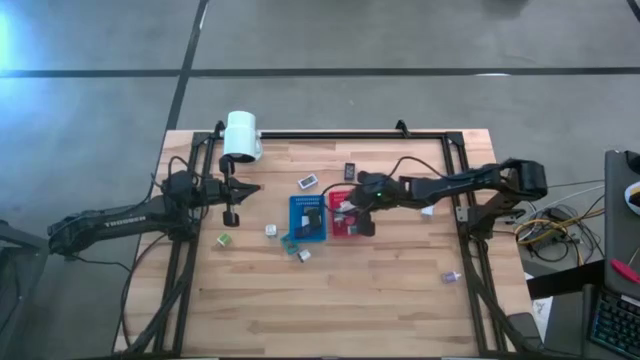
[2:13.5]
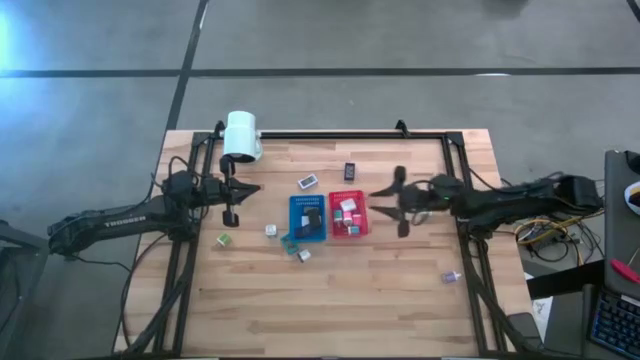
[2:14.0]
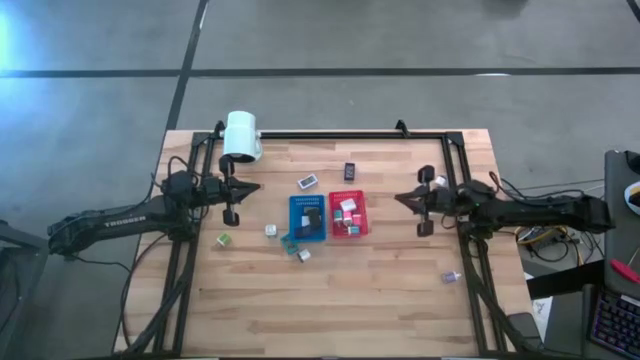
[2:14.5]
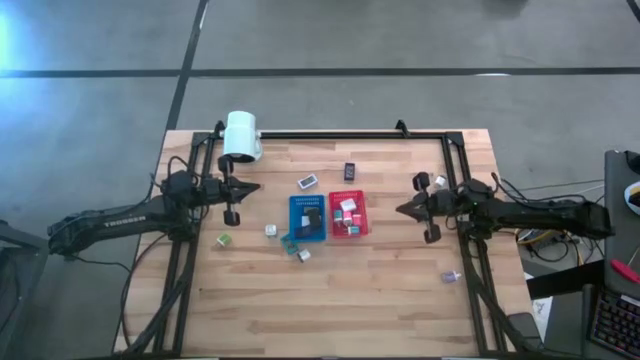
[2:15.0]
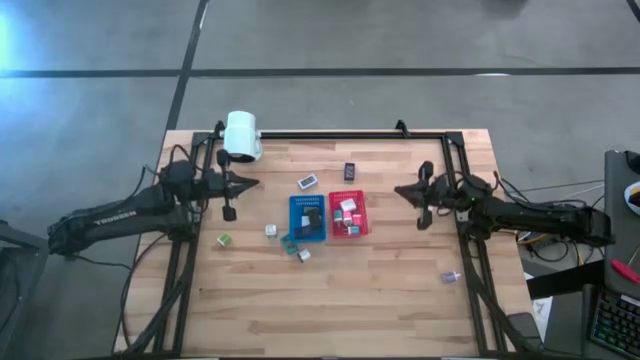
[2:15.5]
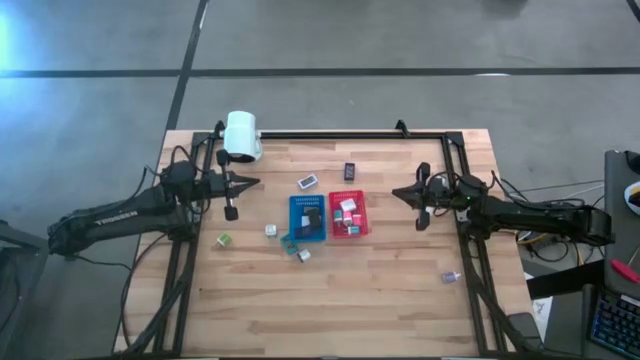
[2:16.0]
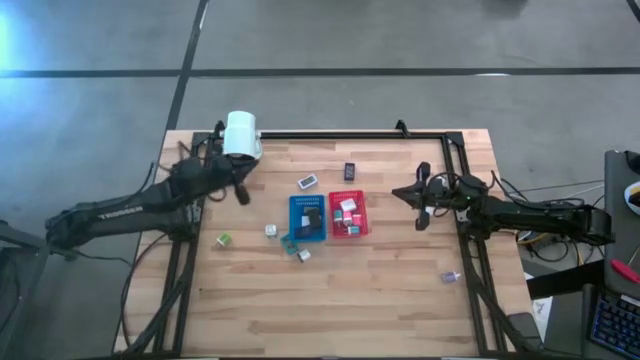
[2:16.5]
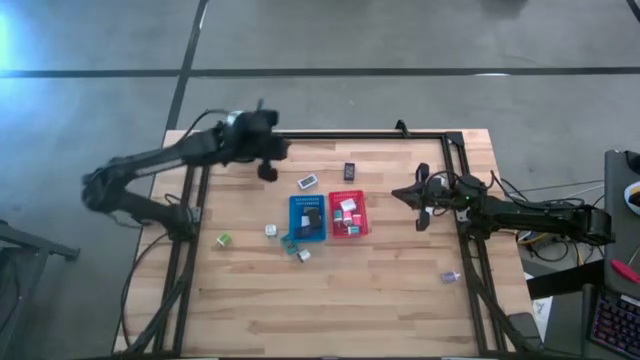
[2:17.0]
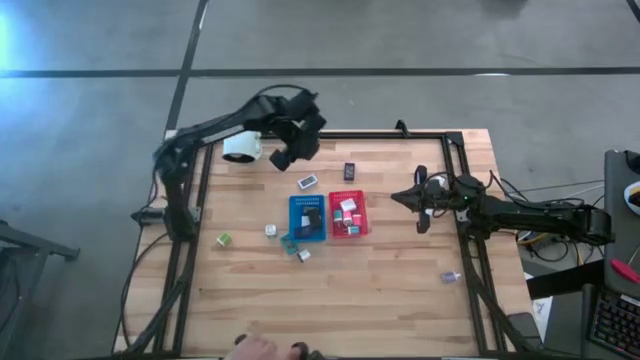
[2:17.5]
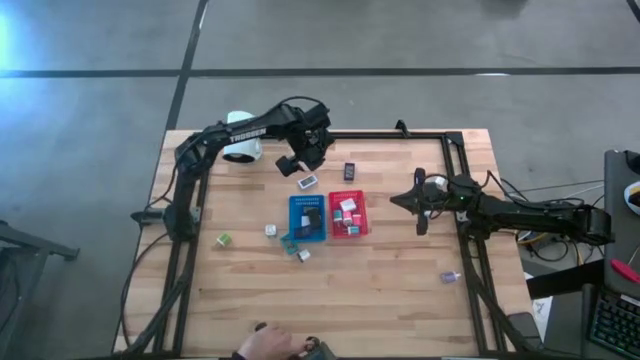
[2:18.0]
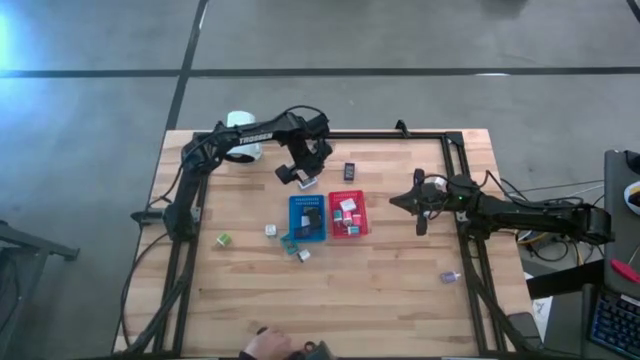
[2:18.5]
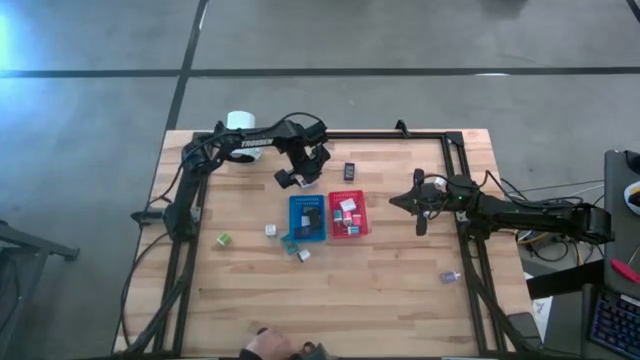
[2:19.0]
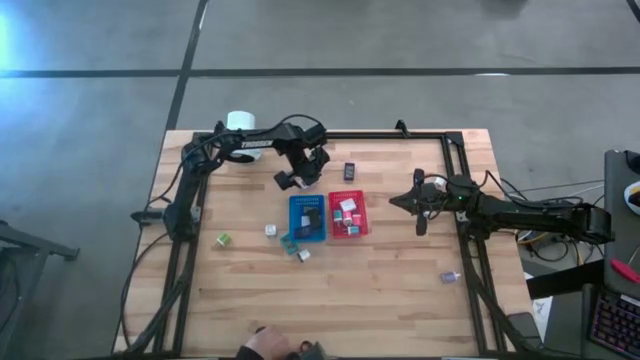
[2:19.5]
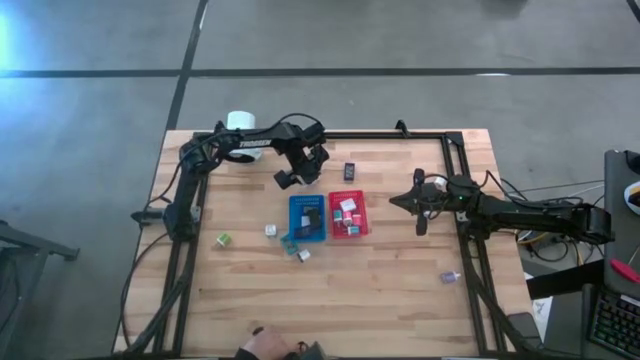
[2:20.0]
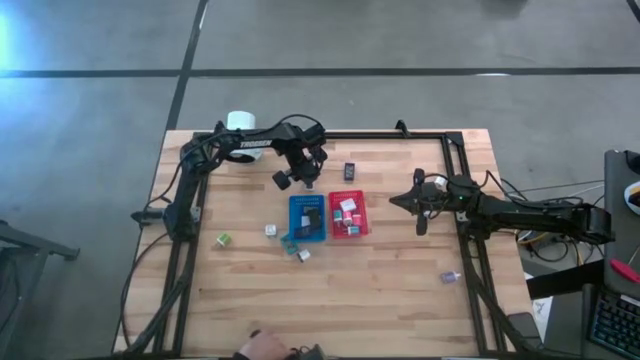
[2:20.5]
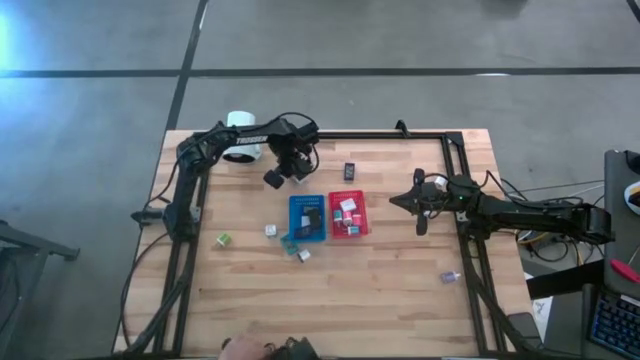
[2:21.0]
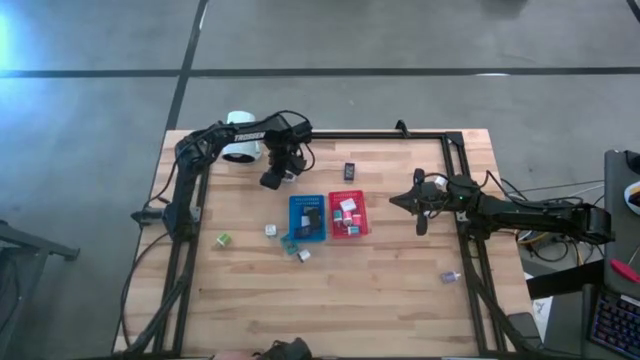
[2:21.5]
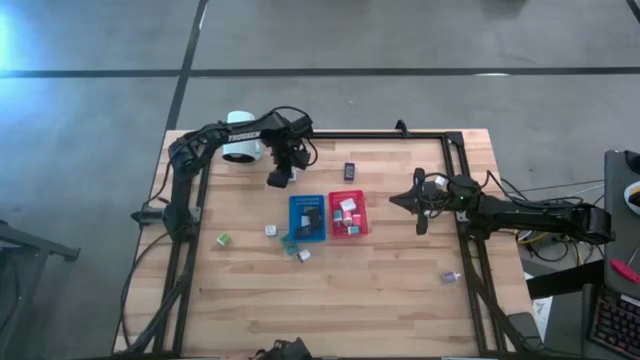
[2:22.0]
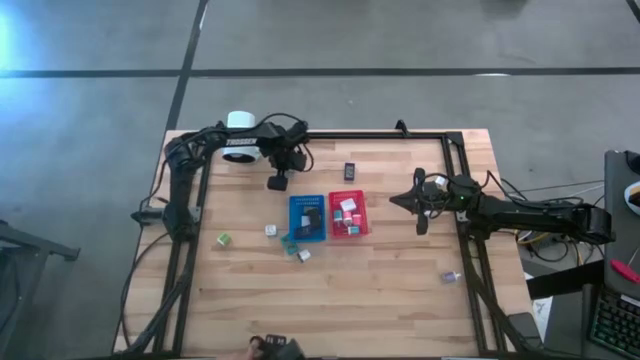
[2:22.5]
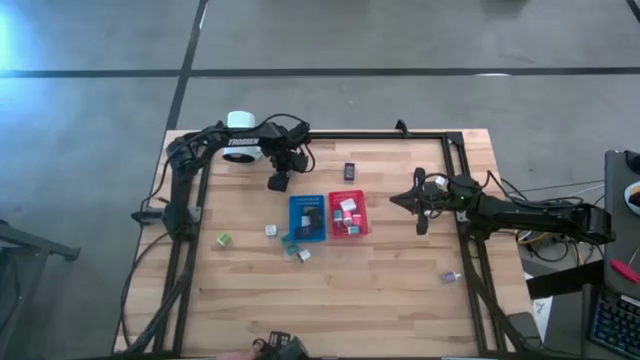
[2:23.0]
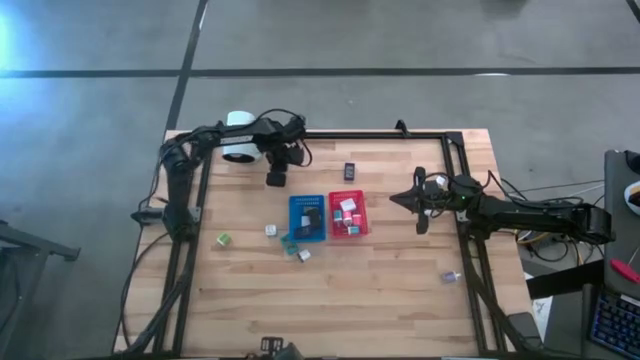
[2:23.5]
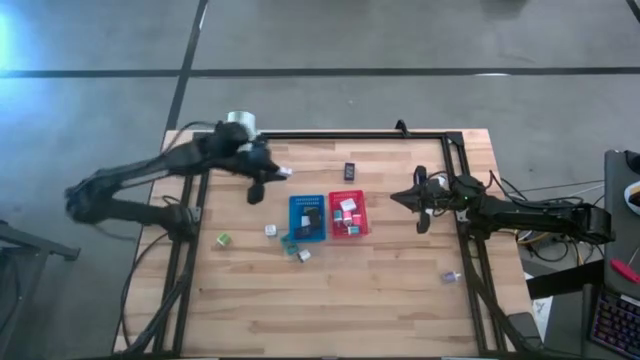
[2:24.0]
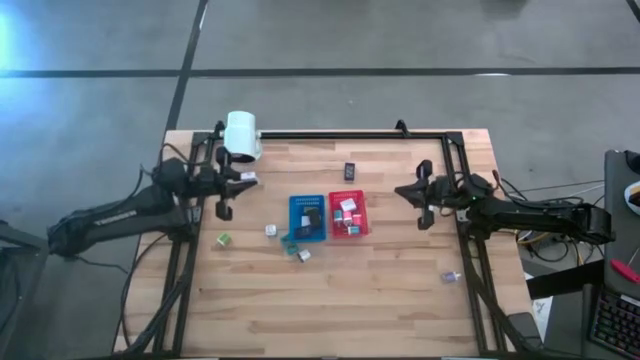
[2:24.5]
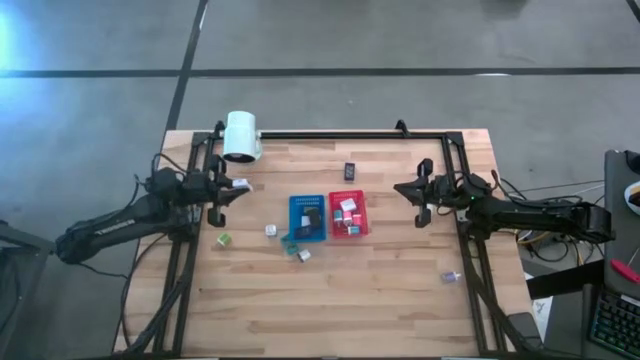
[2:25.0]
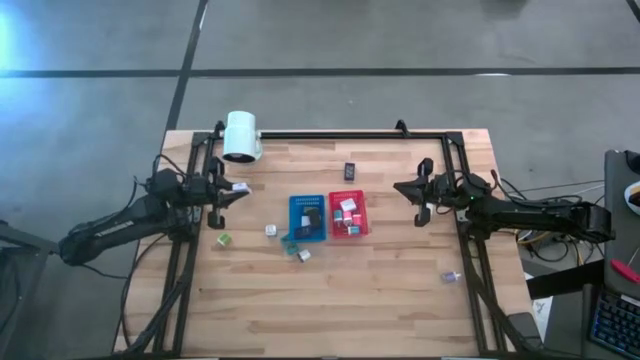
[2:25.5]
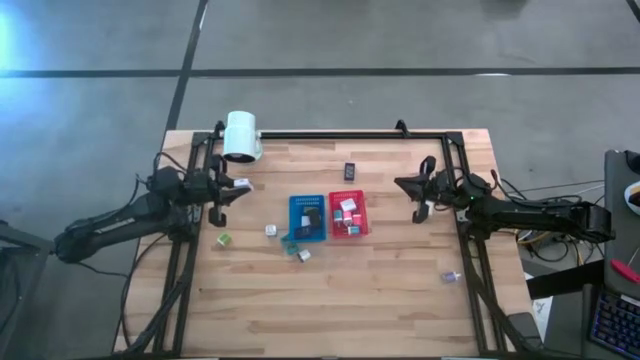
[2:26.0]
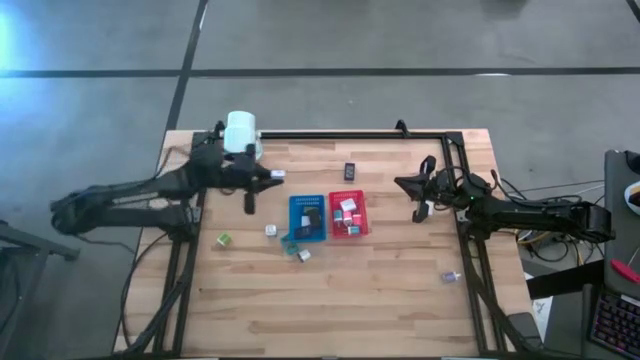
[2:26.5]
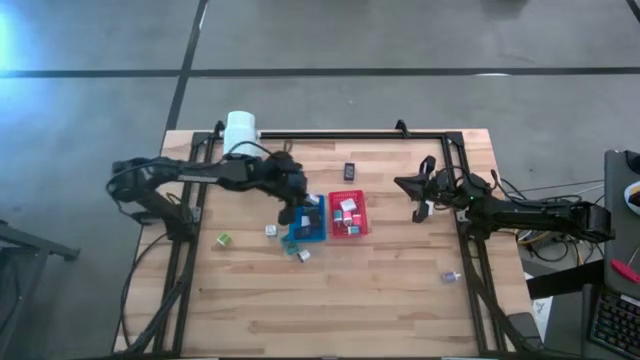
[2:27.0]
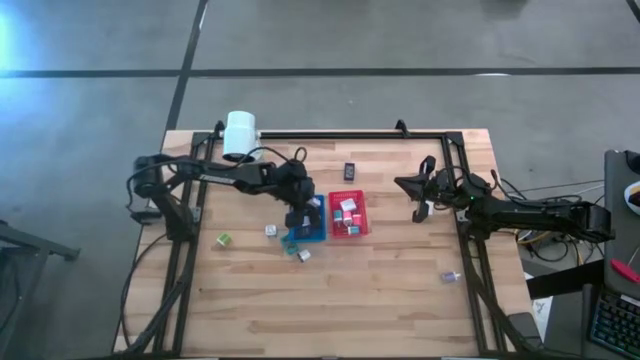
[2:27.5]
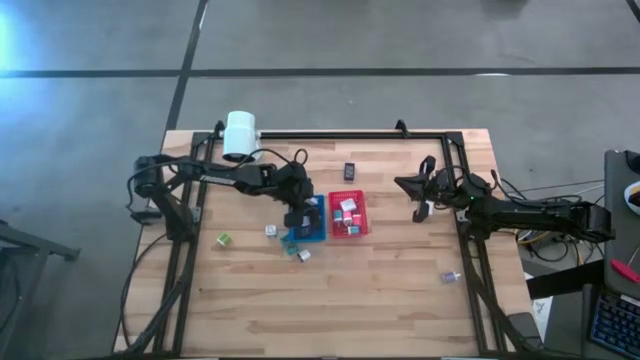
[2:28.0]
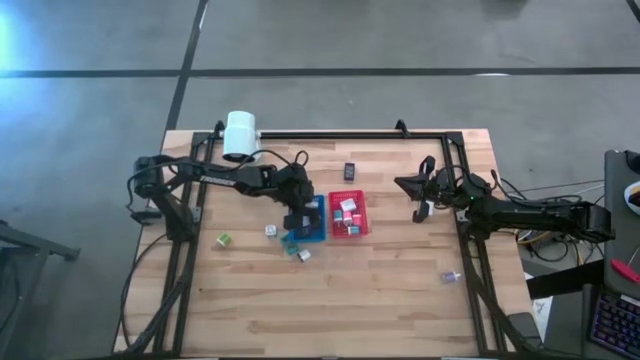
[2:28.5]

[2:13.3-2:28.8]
Task: Pick & Place Office items
Put the white digital clock into the blue bin

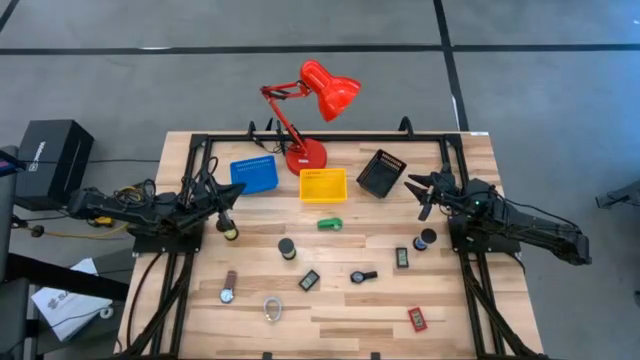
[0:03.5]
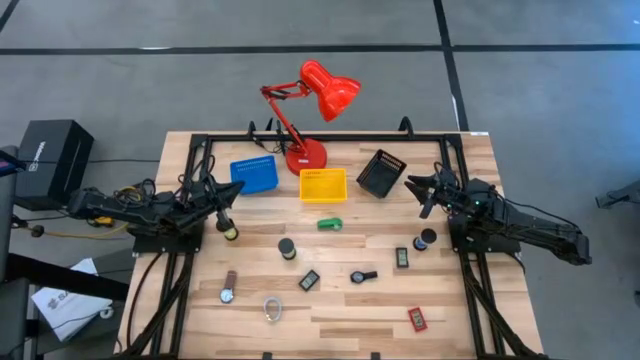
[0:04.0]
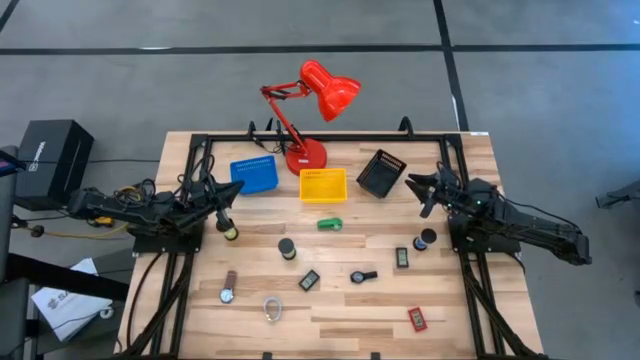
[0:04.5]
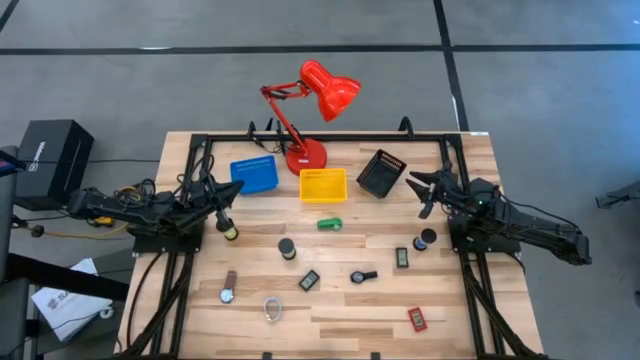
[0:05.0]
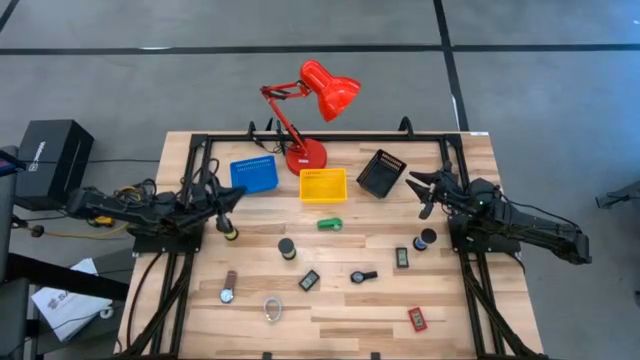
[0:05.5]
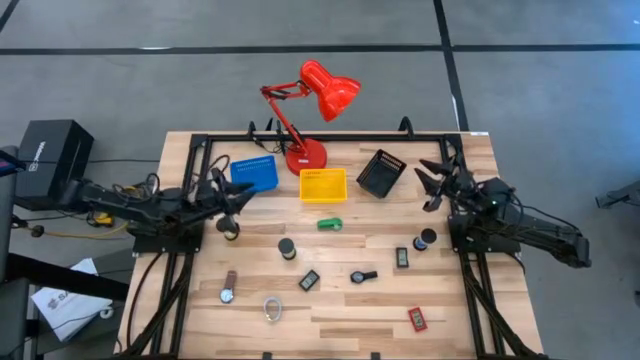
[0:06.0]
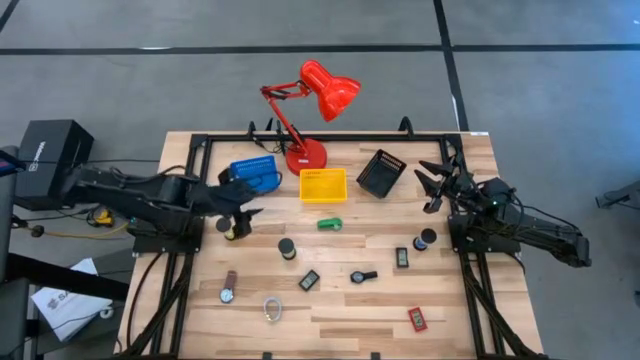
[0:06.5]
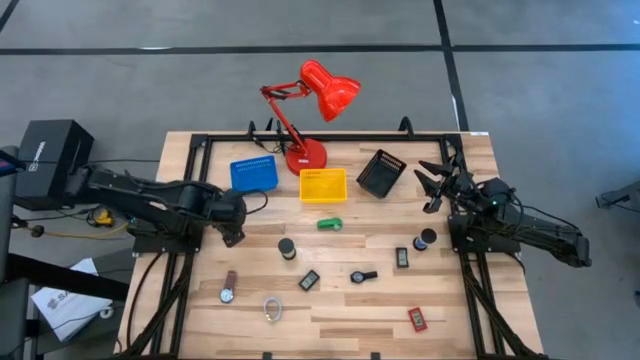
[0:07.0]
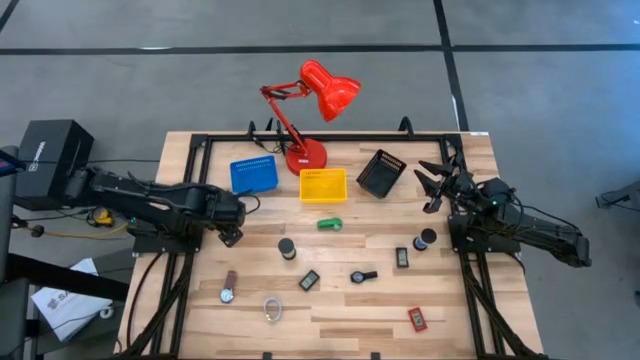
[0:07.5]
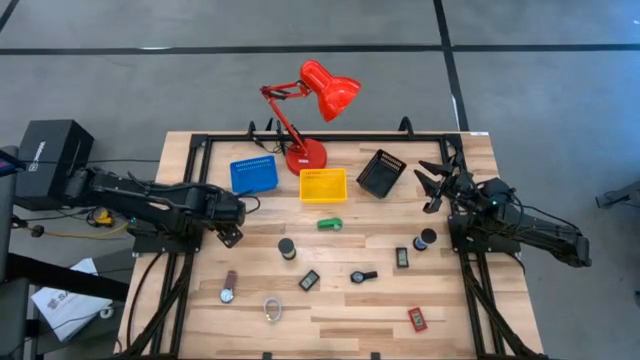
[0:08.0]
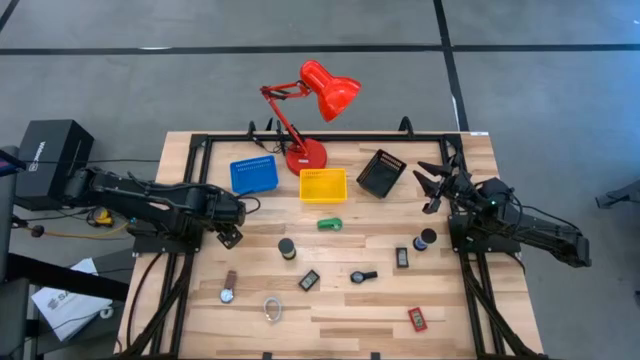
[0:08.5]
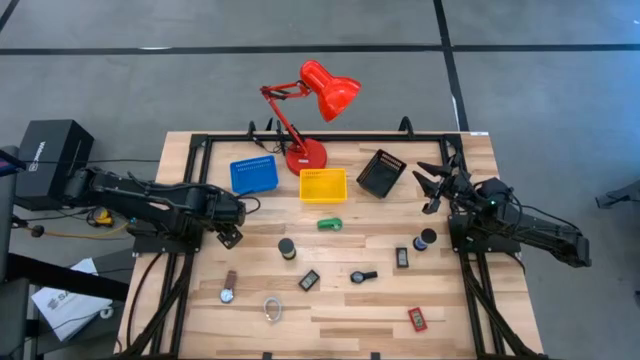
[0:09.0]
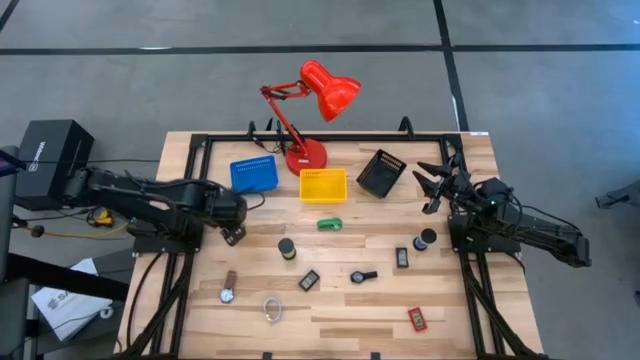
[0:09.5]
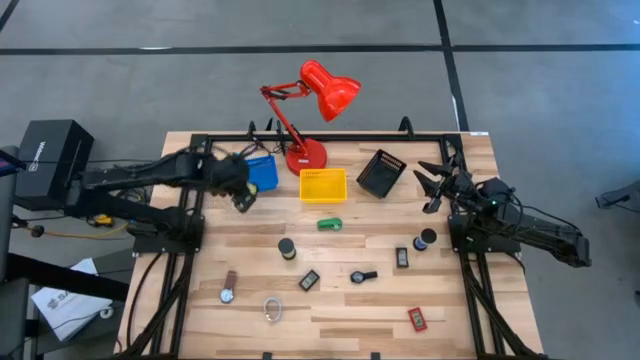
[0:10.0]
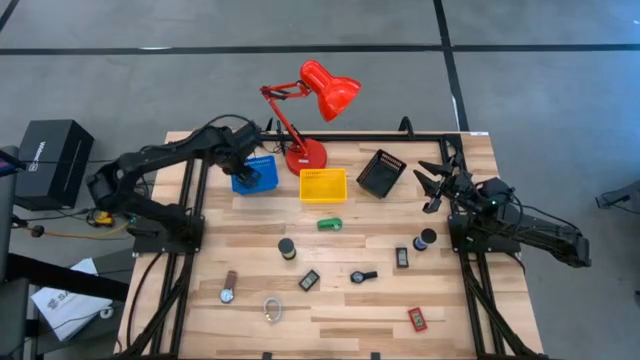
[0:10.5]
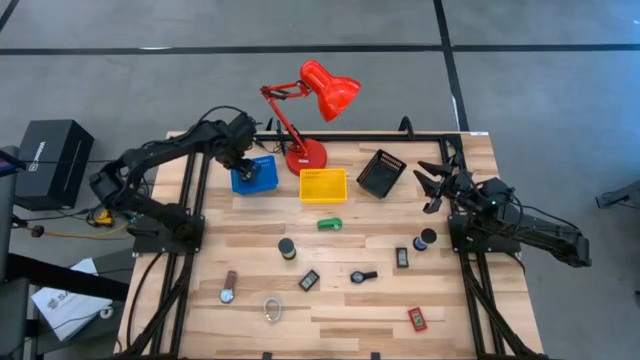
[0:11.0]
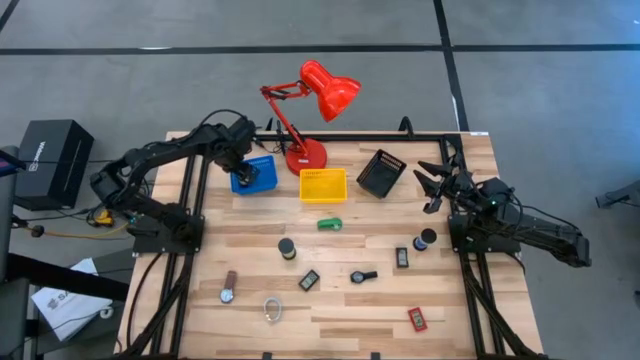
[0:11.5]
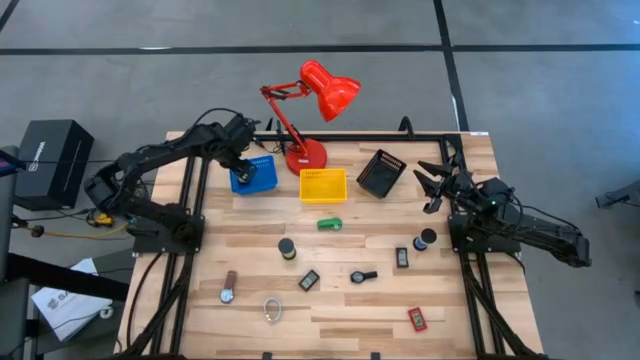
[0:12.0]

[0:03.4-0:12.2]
Task: Pick & Place Office items
Put the top light green hourglass into the blue bin
